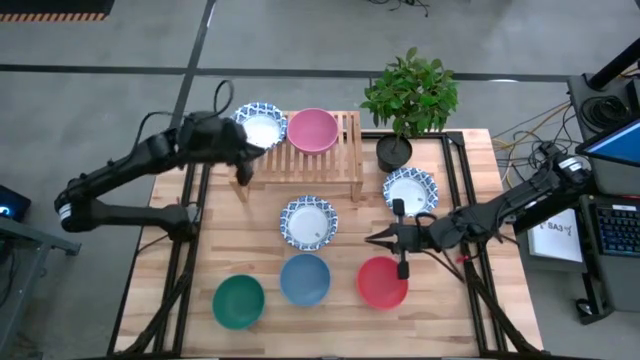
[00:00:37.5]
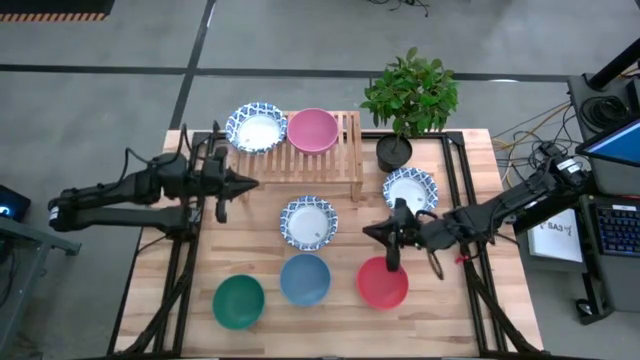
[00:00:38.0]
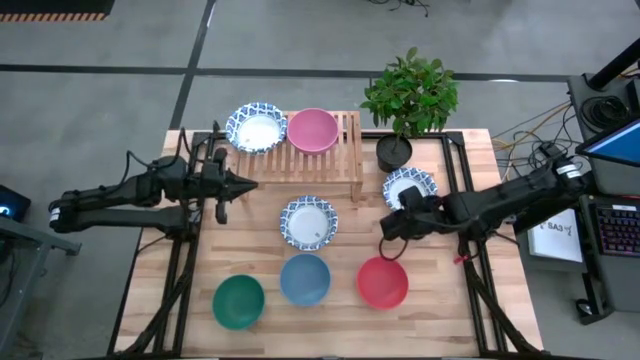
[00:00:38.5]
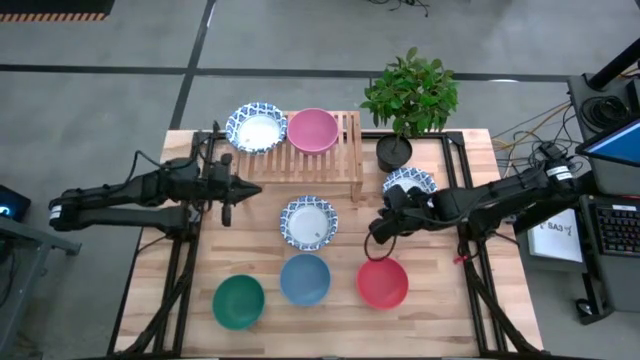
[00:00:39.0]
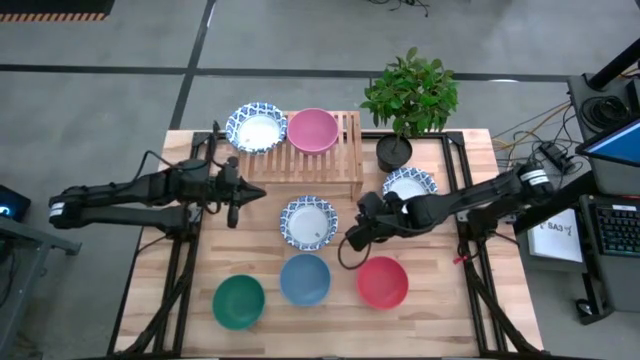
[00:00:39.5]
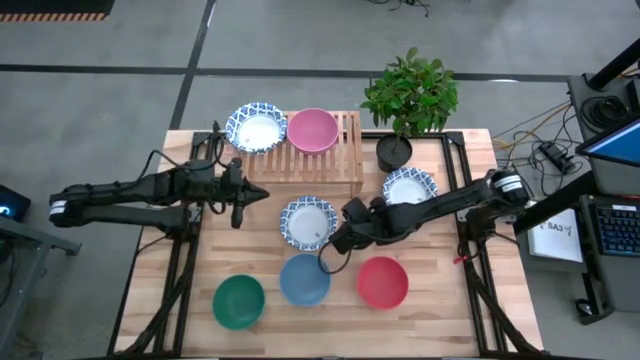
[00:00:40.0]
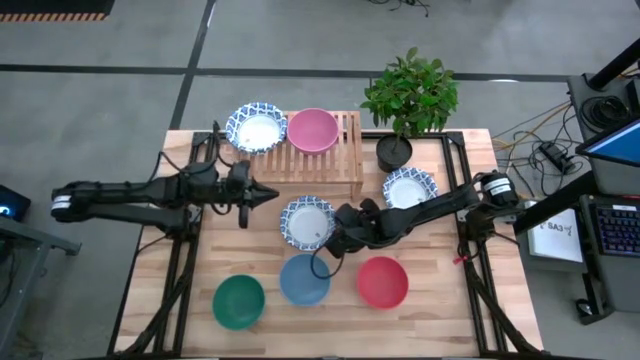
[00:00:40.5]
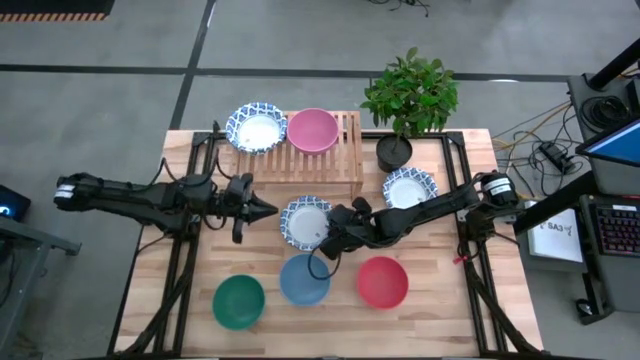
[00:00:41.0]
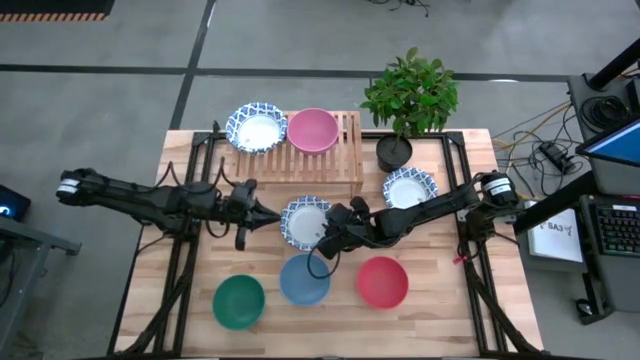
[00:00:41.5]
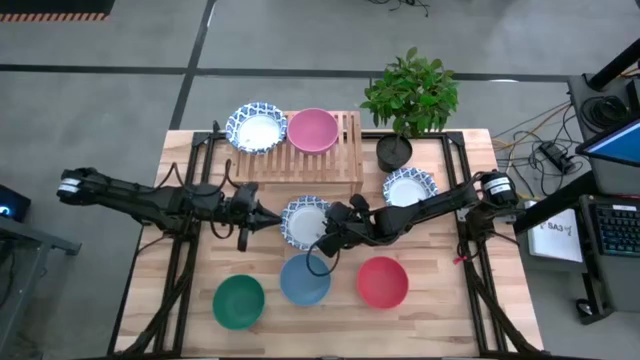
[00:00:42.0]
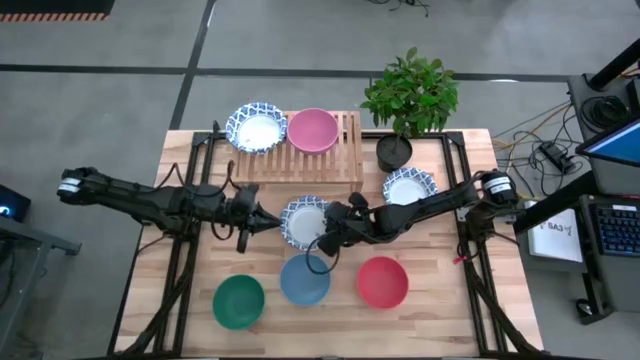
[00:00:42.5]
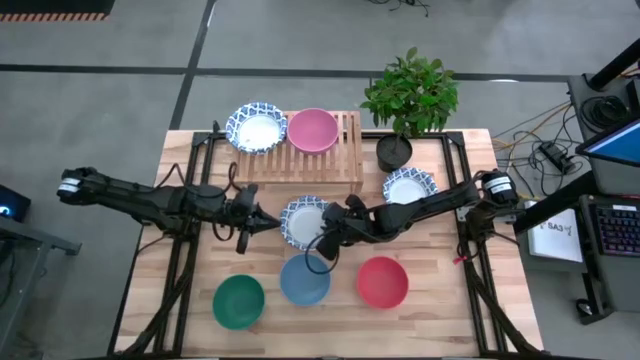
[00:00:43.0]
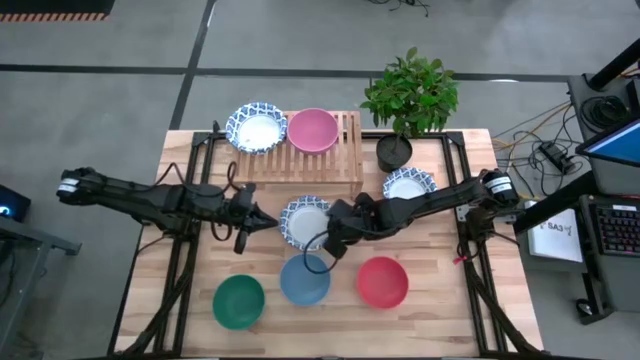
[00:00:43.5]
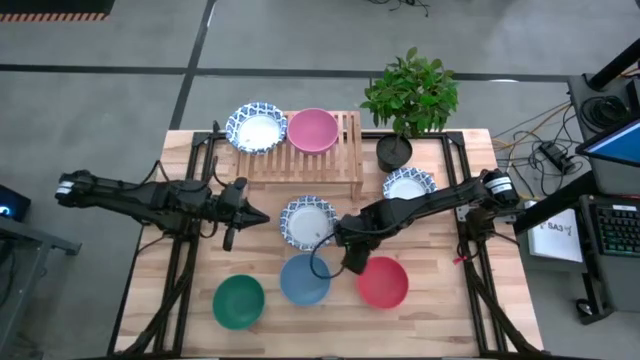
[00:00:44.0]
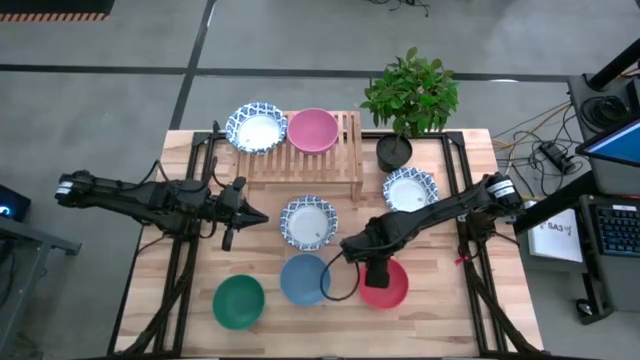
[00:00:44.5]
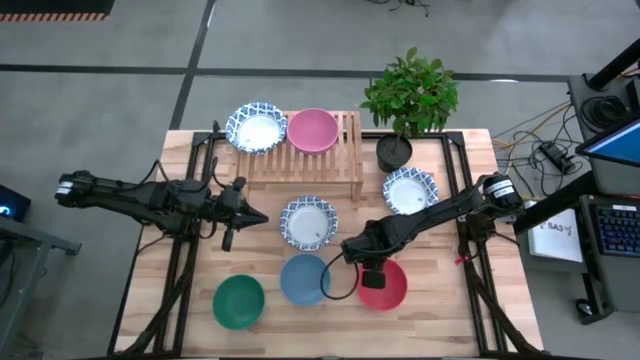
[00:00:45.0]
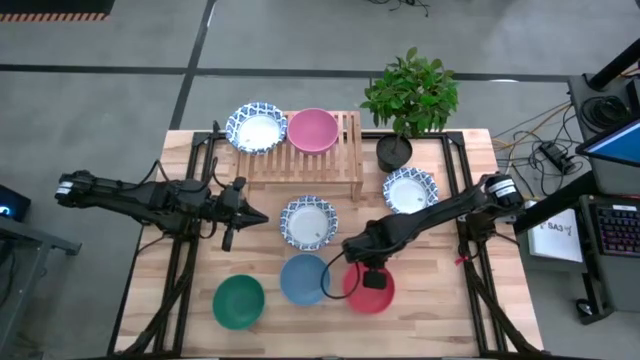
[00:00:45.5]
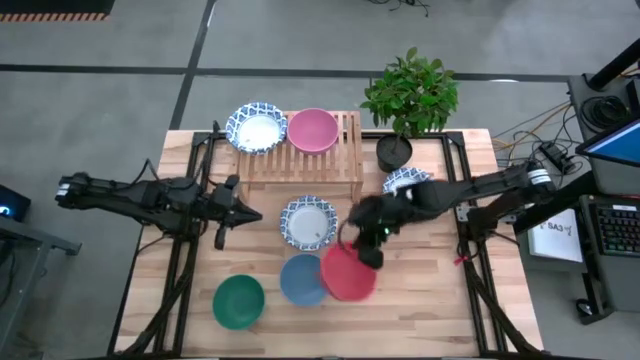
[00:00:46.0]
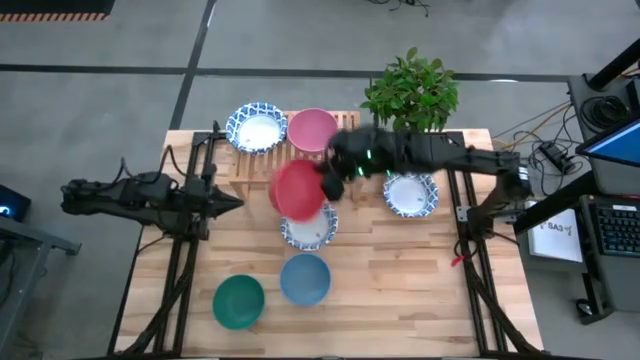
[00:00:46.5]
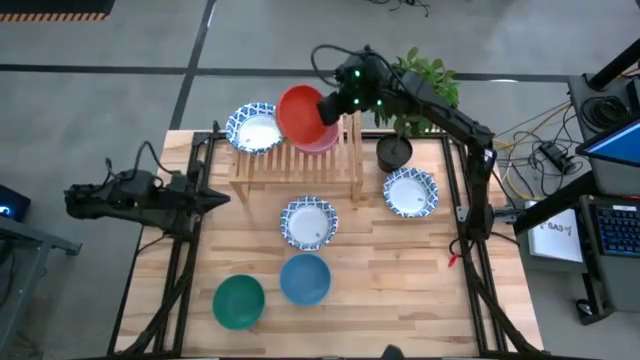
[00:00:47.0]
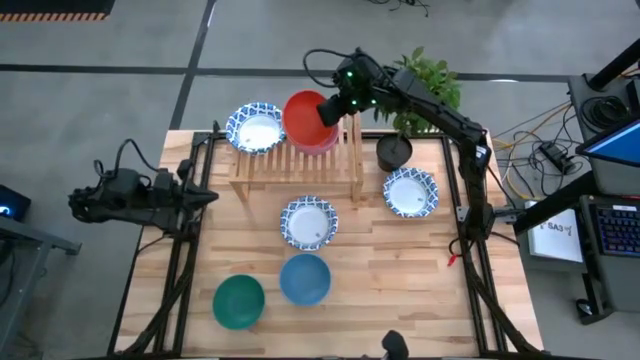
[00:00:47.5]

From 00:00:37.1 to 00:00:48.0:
Task: Place and stack bowls onto a shelf
Stack the orange bowl on top of the pink bowl on the shelf

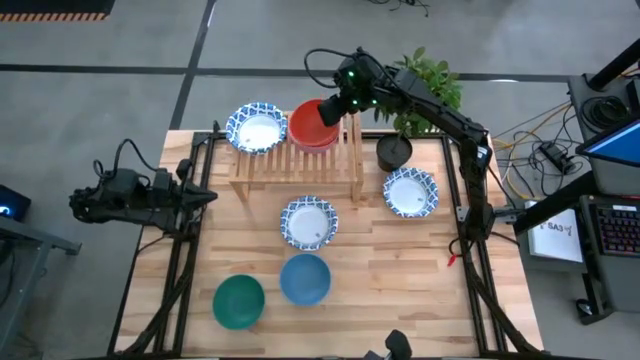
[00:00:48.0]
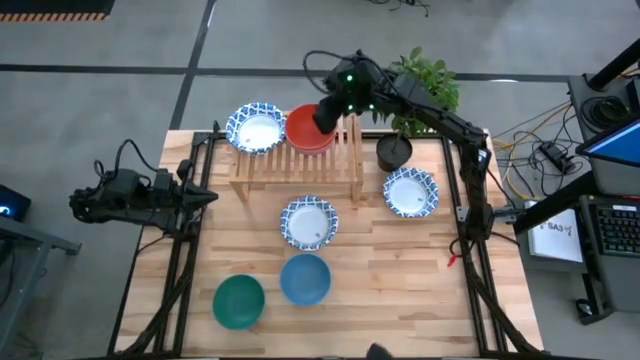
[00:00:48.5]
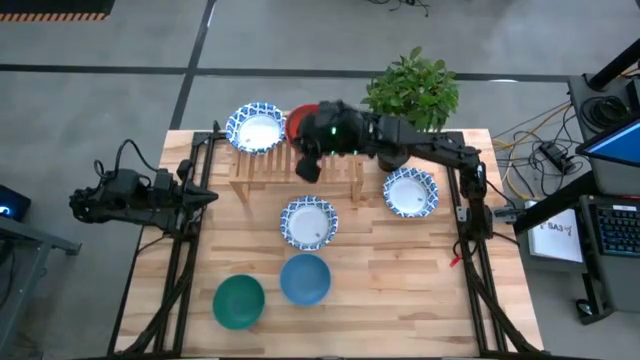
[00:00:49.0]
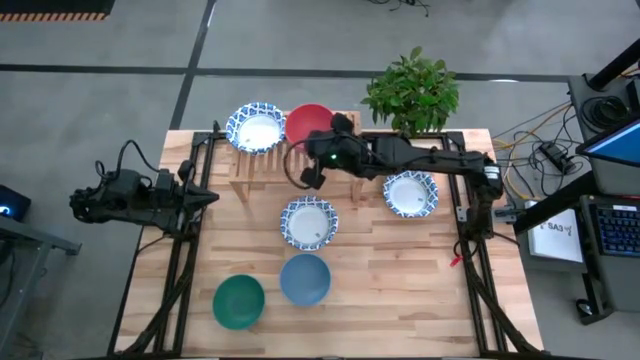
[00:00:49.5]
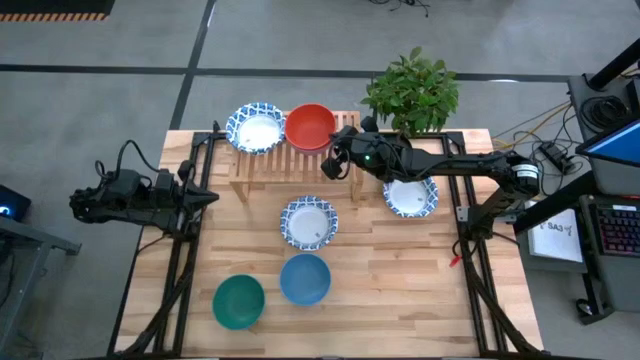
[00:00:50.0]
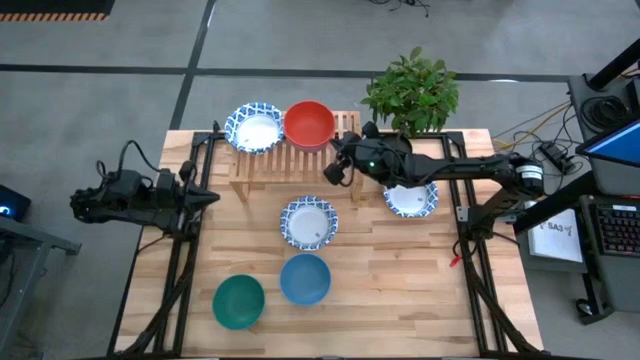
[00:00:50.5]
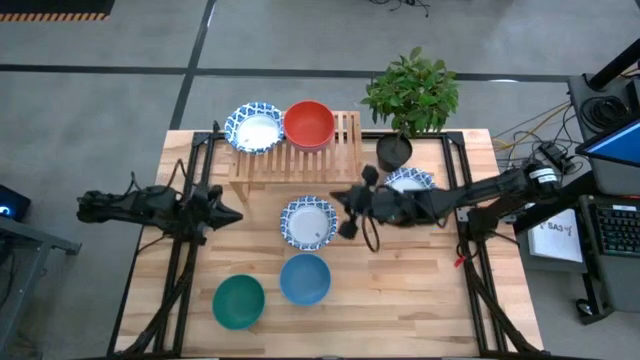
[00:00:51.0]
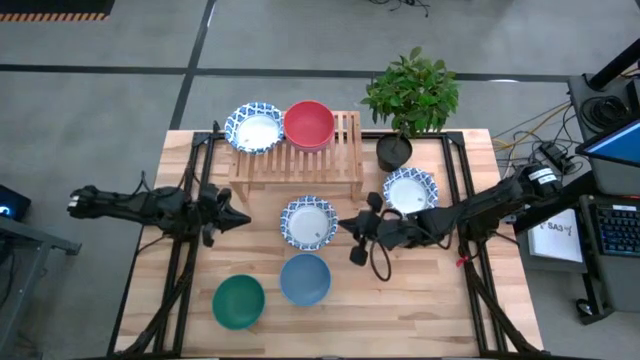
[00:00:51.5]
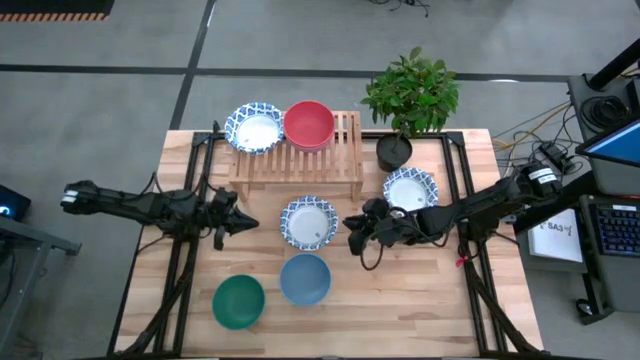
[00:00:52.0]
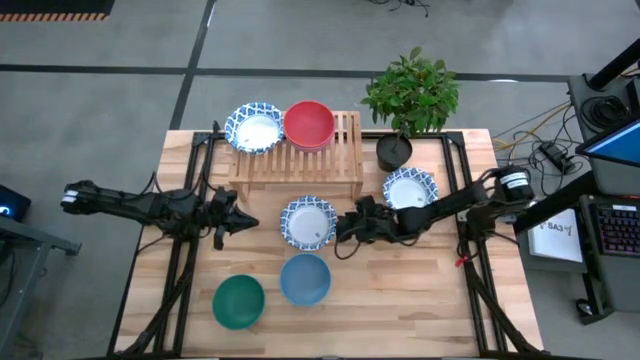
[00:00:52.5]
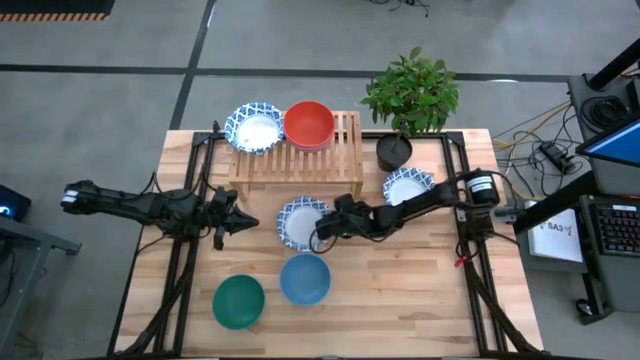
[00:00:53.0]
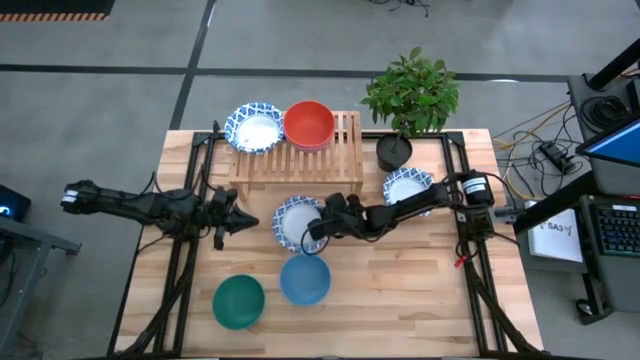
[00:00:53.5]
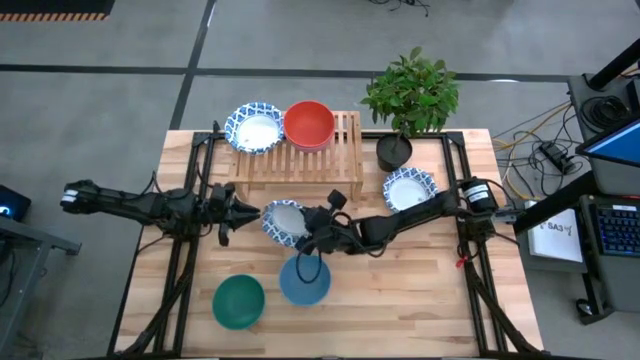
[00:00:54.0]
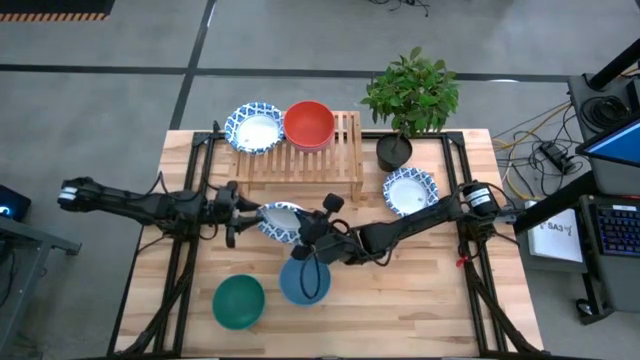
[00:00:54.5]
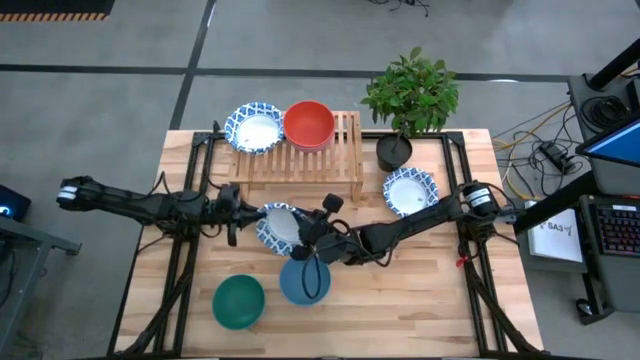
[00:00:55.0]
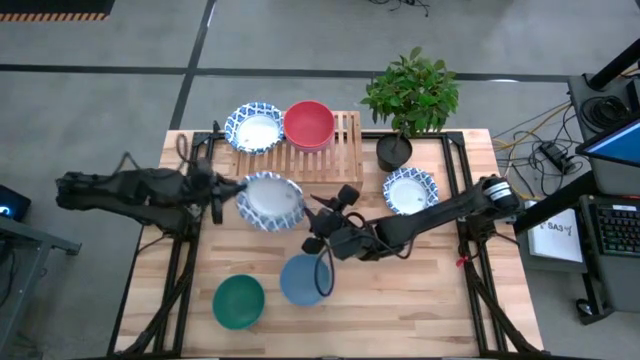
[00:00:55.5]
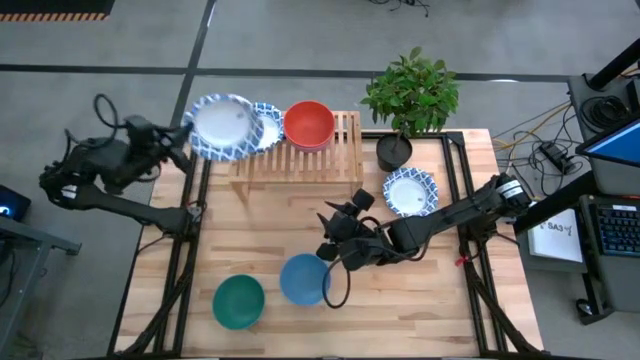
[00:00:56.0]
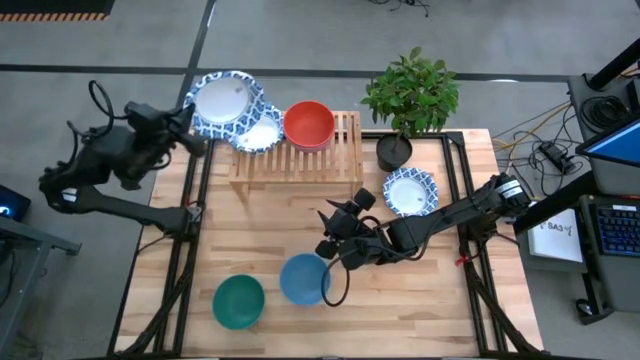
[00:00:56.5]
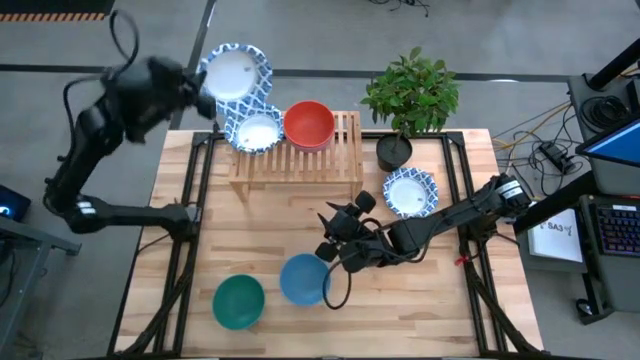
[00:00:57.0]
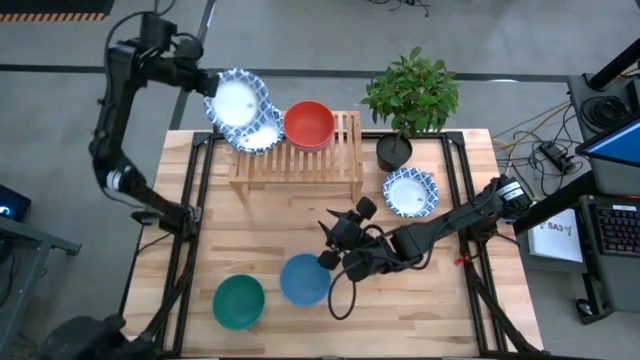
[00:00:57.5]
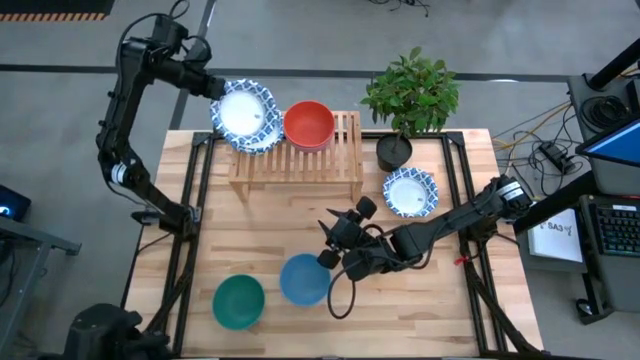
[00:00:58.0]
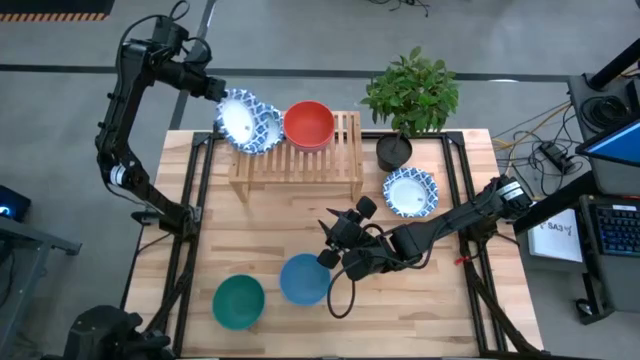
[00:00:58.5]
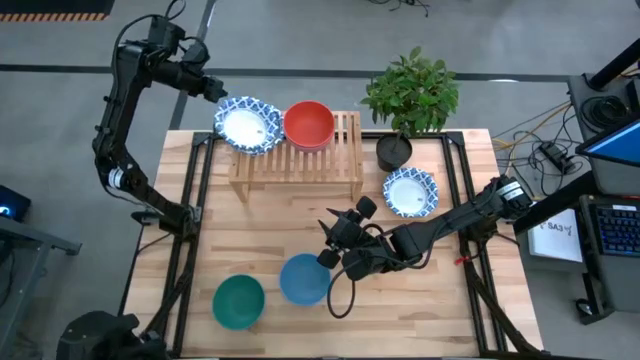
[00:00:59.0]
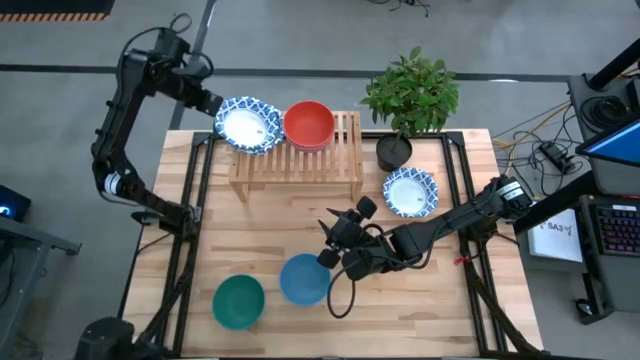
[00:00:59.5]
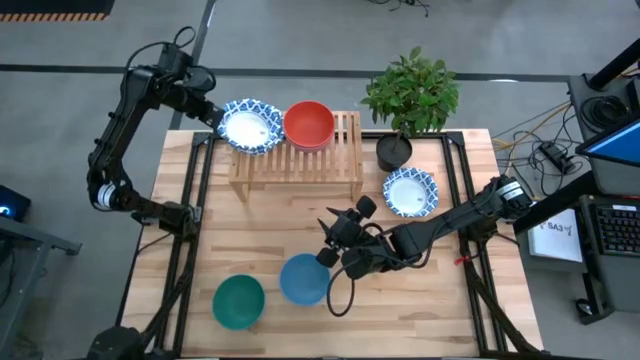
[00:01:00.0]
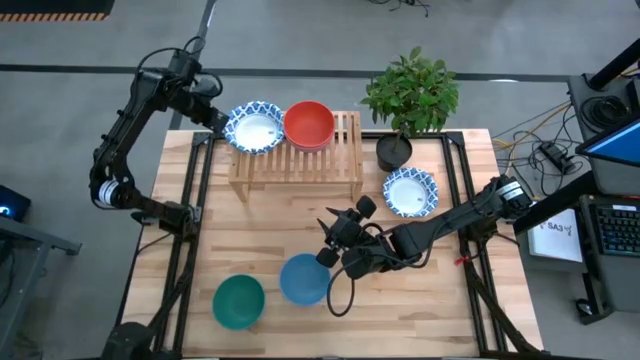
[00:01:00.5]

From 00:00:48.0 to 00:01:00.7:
Stack the white patterned bowl on top of the white patterned bowls on the shelf
